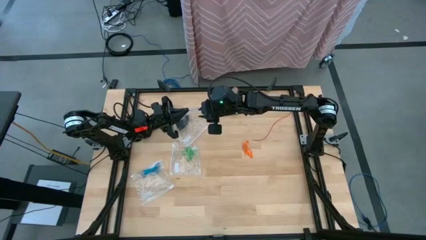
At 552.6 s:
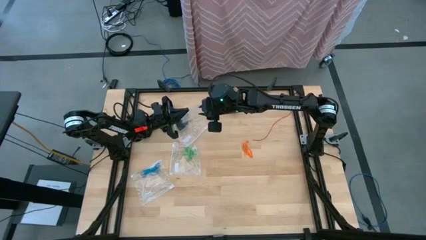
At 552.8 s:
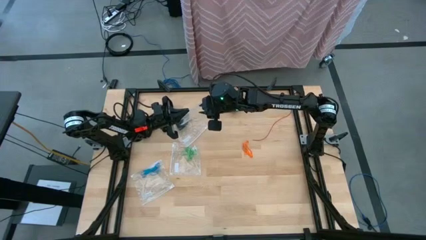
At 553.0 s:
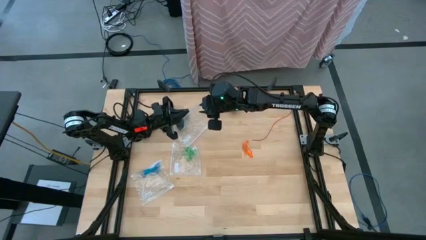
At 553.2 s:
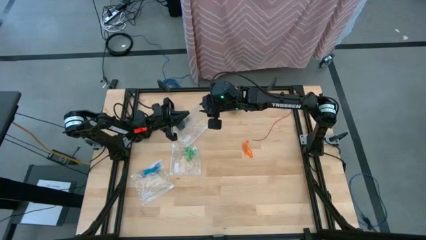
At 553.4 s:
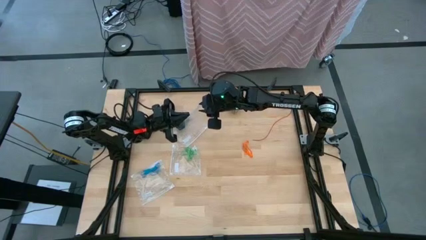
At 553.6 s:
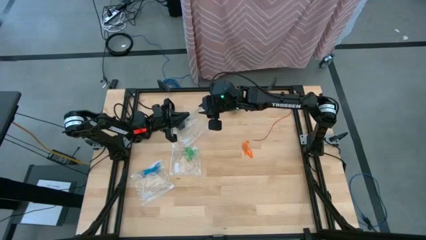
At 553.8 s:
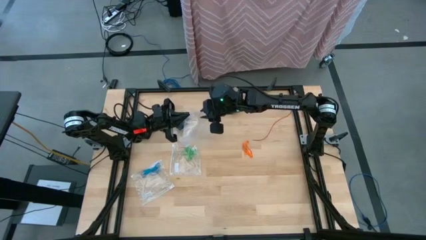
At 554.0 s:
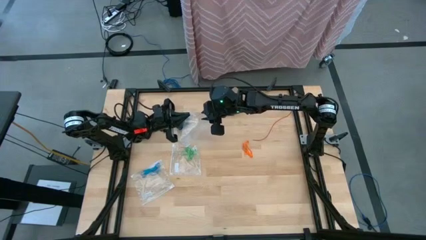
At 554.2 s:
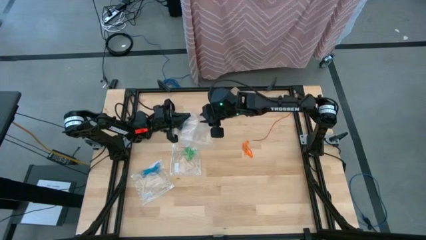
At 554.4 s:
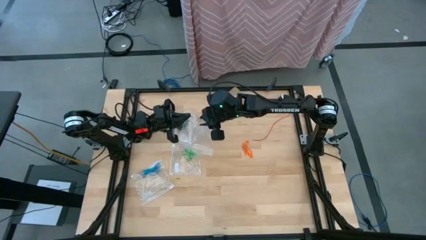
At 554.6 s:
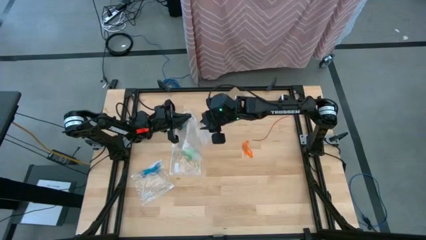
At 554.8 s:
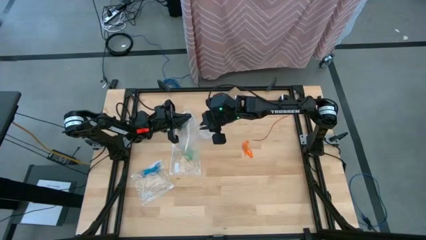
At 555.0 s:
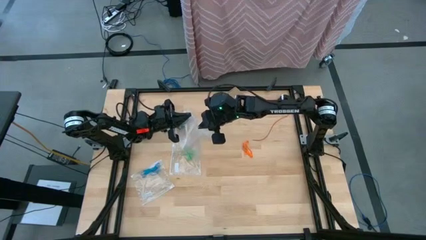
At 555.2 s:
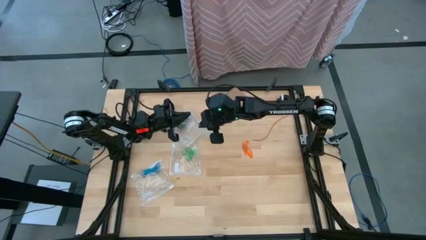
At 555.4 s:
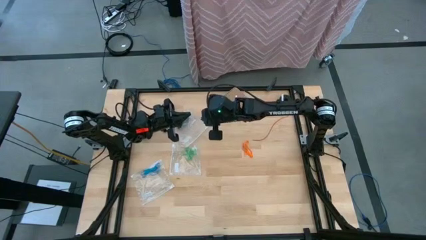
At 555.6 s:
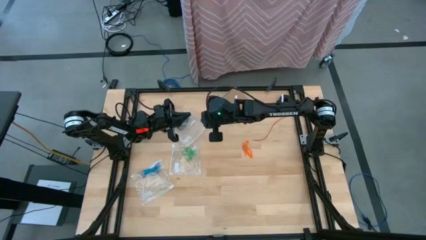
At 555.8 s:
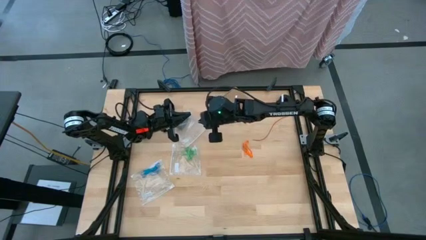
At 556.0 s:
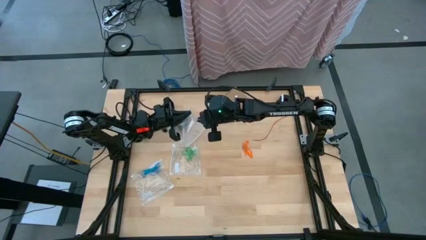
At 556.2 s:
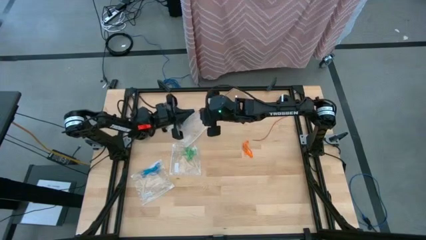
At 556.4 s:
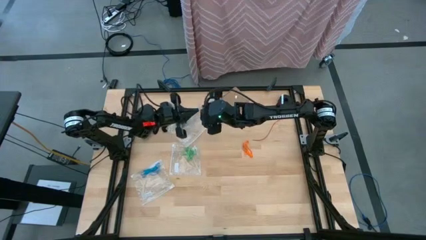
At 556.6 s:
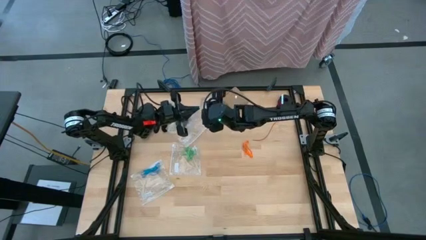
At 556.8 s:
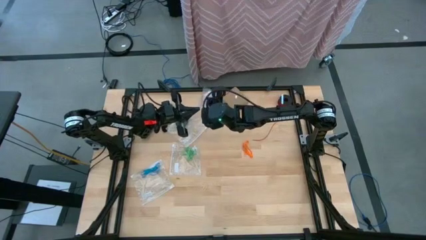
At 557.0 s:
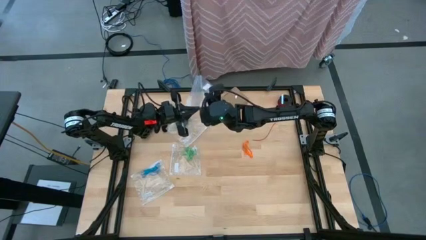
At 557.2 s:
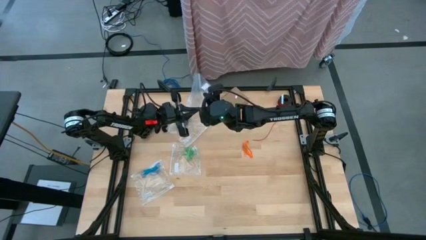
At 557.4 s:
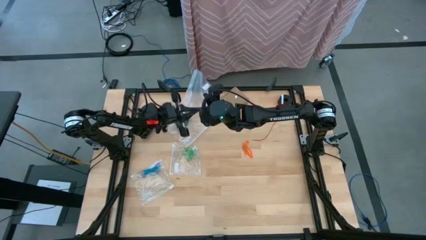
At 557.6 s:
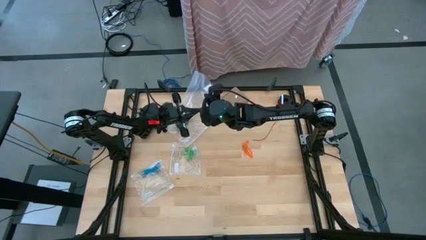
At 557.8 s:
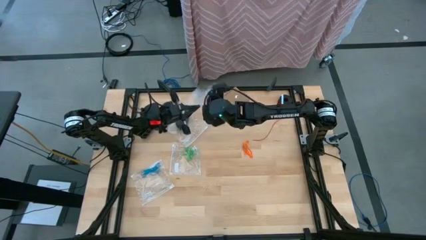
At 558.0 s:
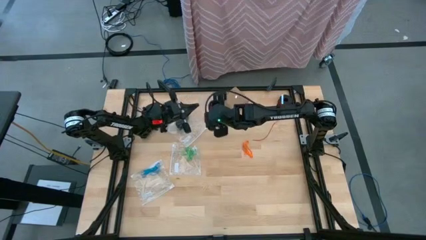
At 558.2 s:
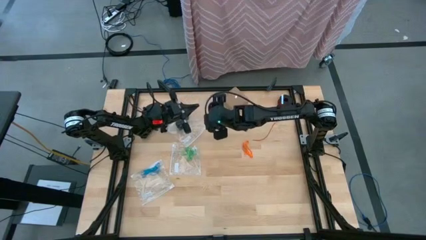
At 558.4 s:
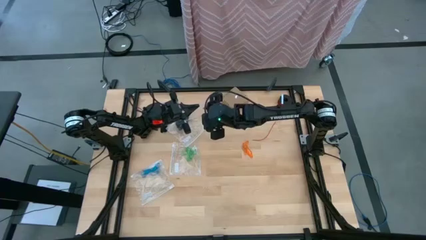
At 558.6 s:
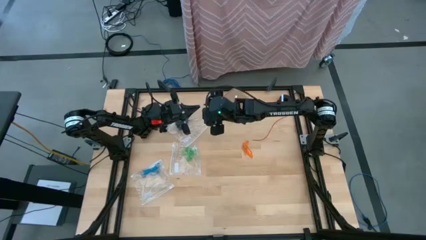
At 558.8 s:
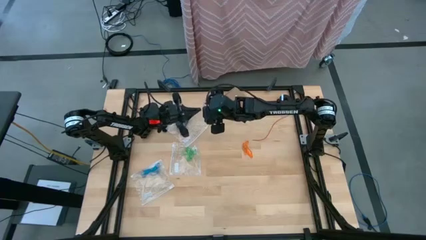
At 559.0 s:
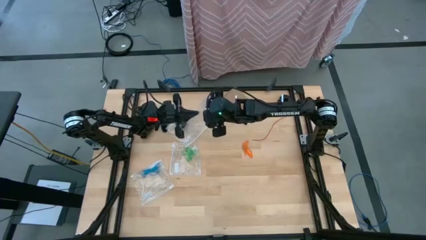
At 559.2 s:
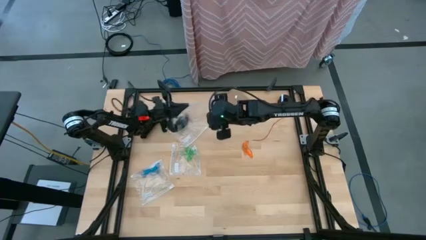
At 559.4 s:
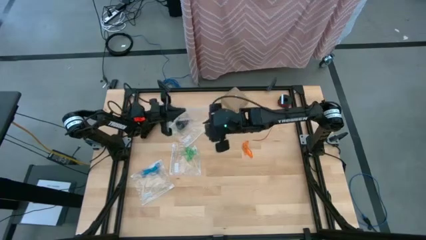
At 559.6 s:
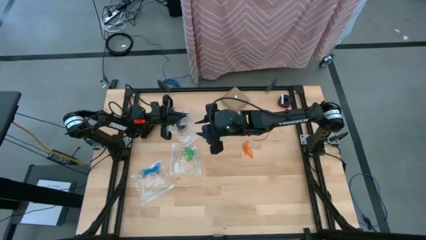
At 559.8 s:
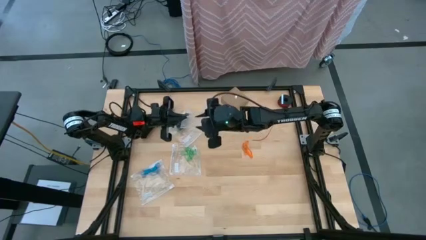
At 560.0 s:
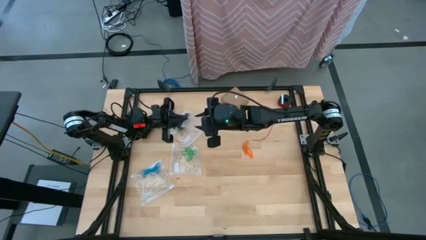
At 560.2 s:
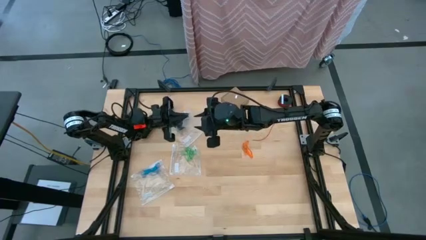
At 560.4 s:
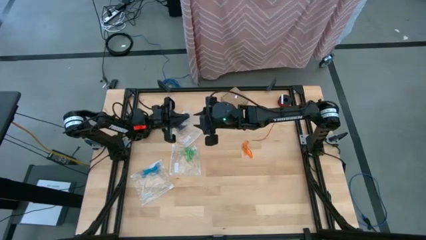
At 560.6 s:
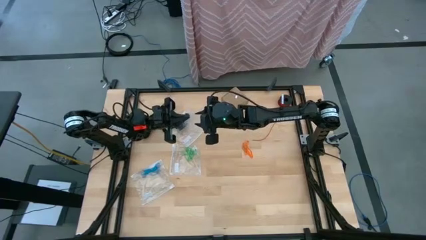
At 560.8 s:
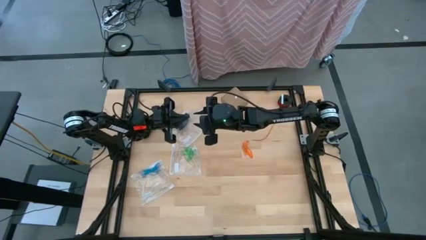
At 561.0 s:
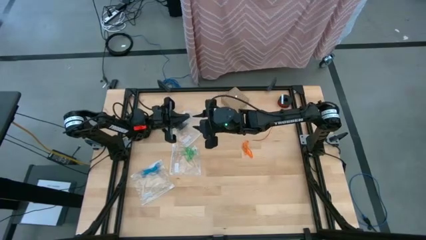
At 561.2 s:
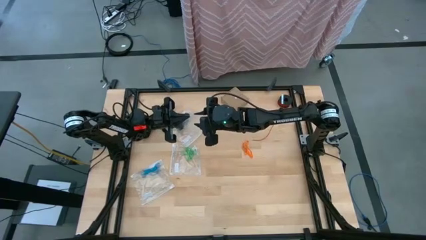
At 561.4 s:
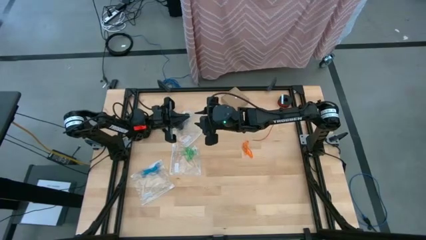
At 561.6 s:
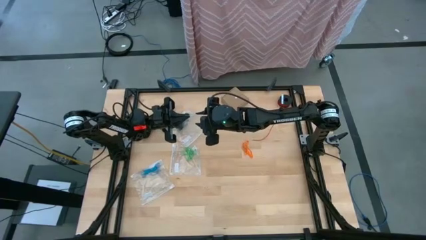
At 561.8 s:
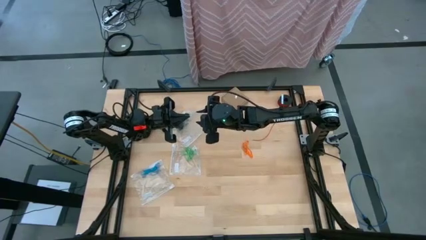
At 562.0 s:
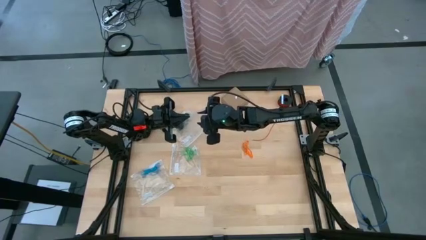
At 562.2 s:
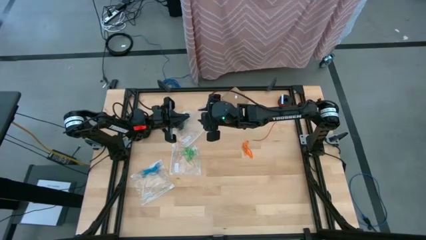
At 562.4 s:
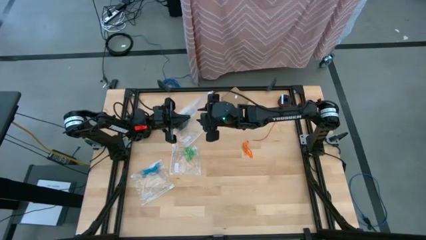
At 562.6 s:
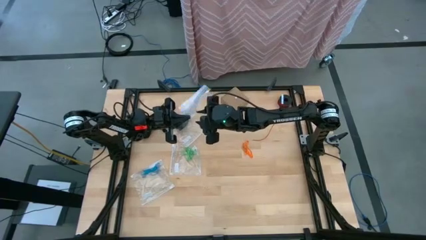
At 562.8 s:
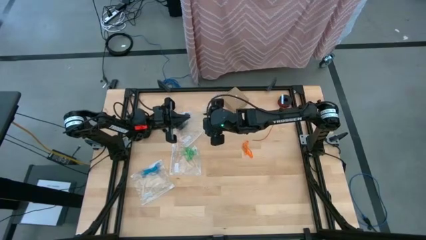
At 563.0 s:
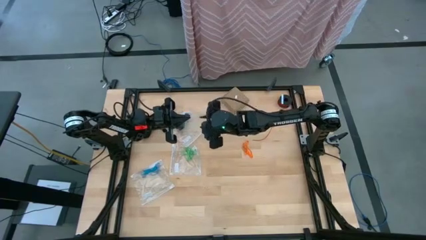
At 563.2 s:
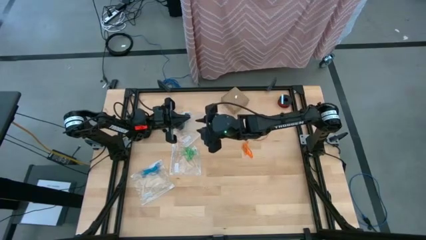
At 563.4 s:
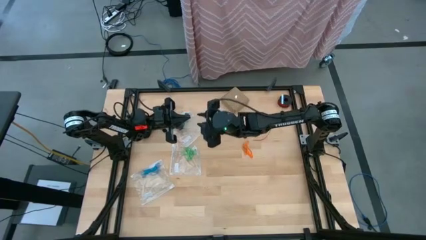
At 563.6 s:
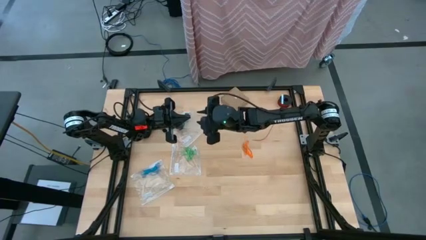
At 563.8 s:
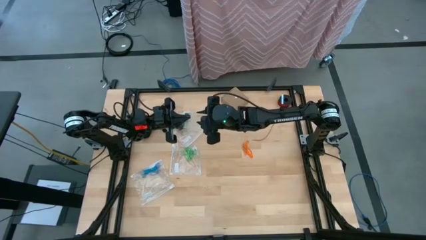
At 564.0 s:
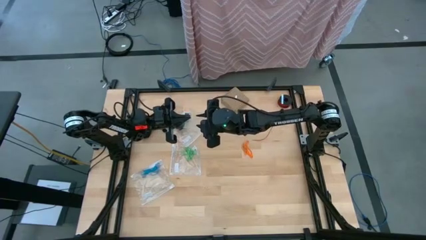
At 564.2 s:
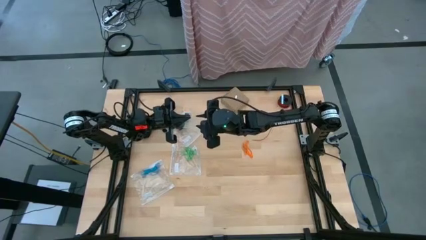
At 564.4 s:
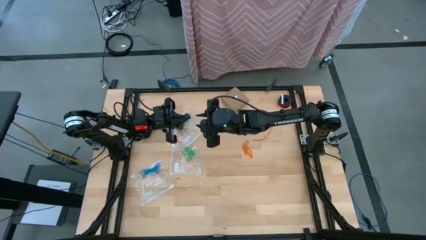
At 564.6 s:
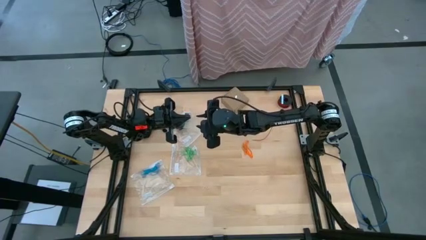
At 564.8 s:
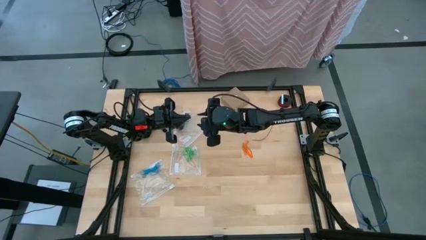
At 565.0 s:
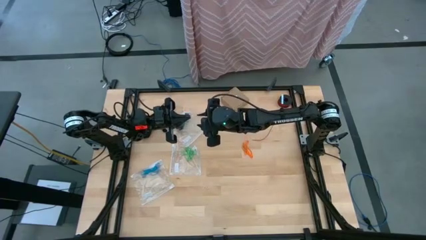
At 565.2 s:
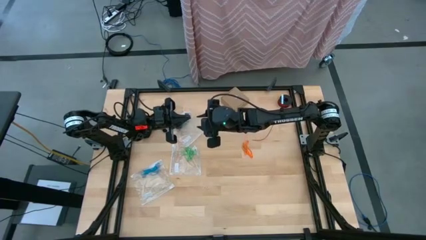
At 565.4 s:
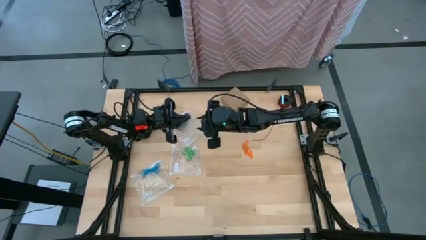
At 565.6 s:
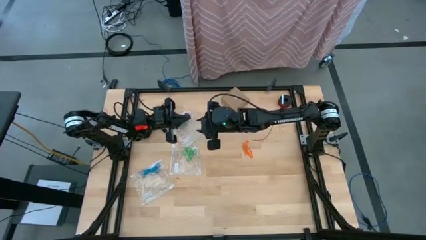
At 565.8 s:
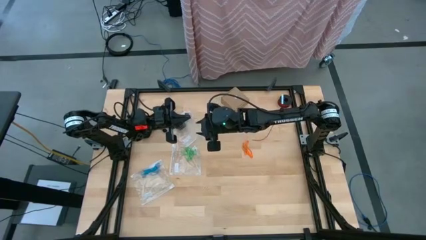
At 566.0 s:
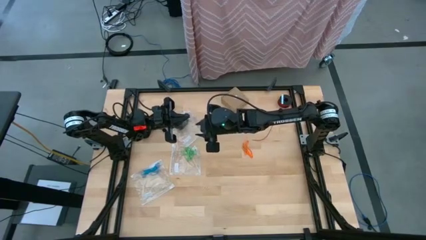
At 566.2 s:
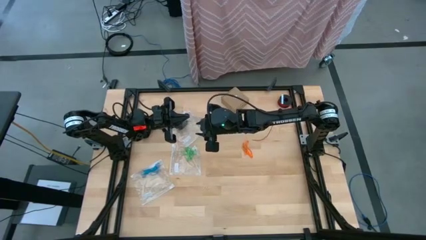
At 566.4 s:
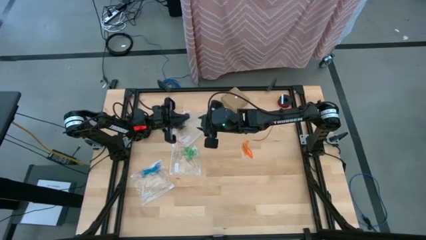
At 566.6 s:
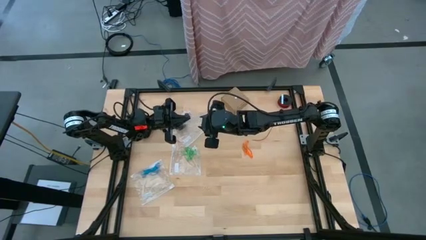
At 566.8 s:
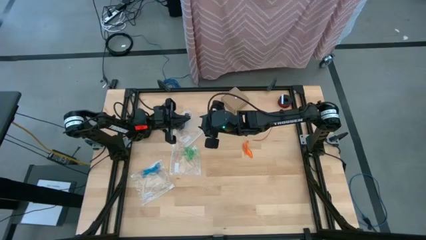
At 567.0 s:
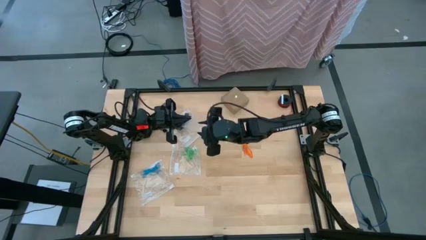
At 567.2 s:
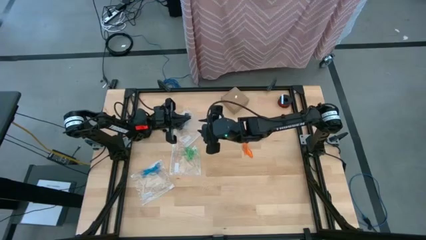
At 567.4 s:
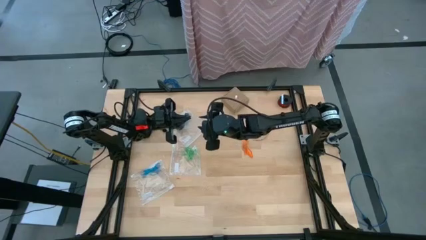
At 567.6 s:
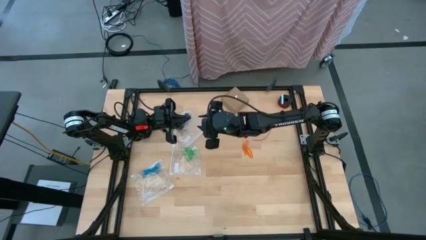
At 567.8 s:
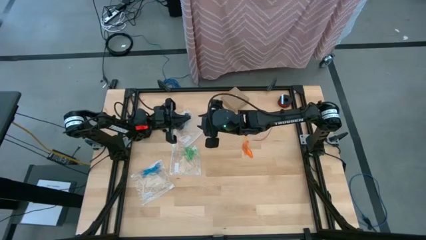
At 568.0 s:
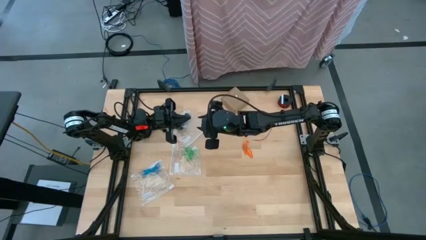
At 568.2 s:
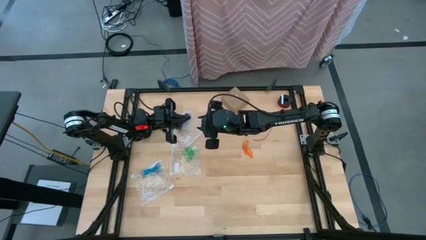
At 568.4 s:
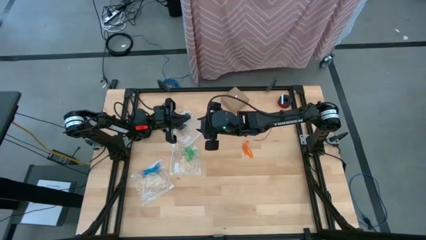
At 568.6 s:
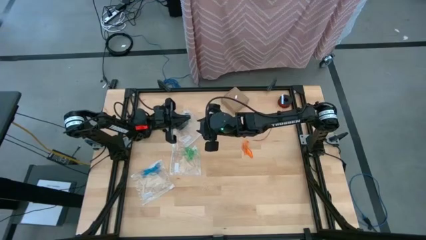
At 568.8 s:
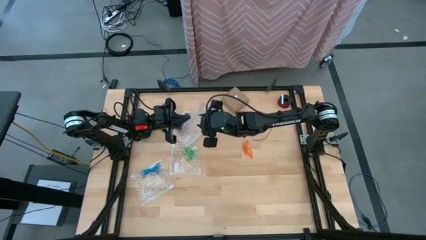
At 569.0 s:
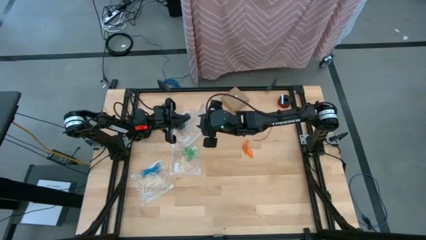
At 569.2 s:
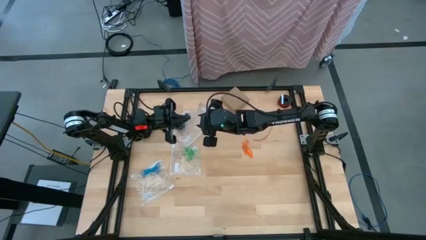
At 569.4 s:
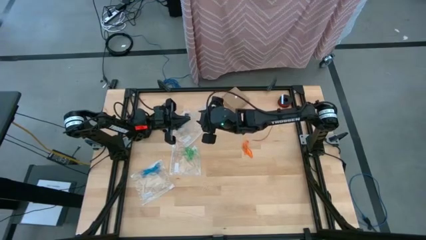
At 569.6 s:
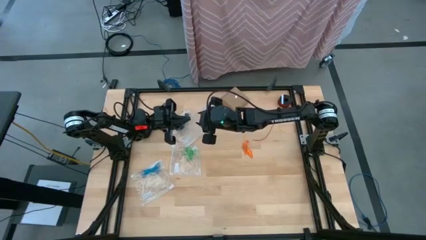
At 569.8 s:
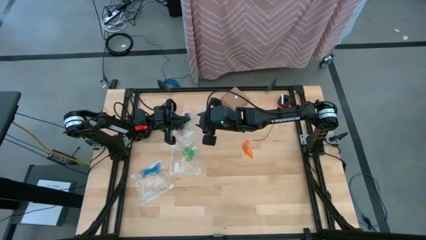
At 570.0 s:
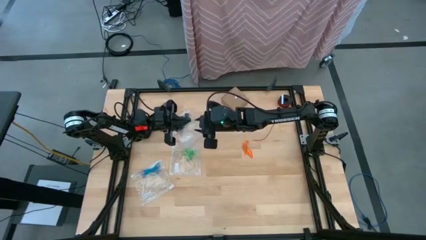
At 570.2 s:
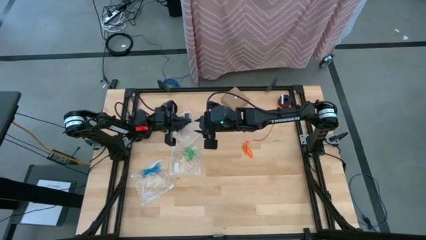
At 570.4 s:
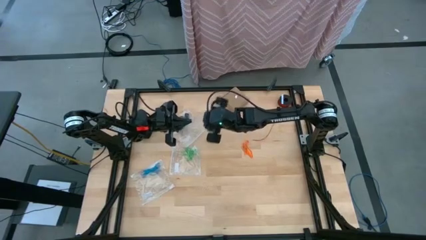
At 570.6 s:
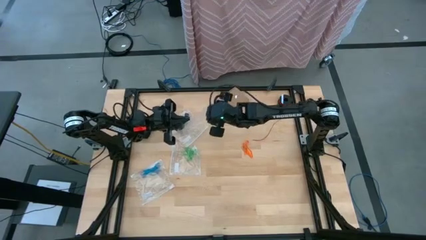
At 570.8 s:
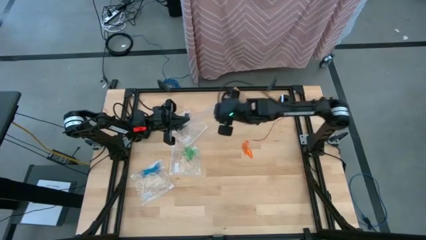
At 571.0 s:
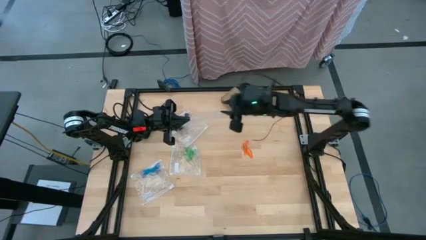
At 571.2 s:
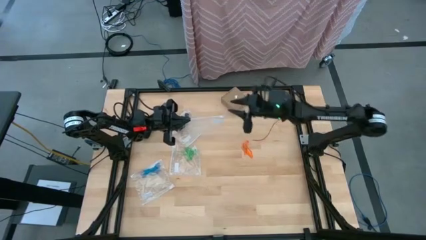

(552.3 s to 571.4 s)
Task: Sort rubber bands
Open the transparent zip bag
